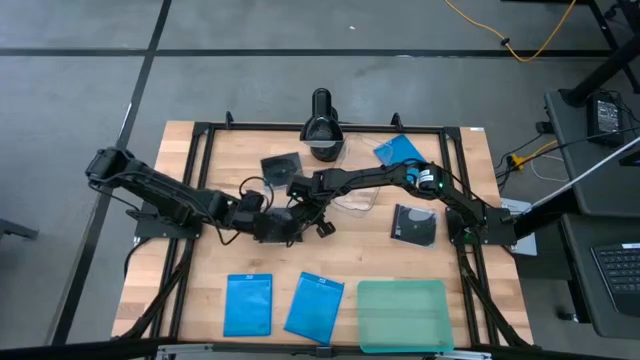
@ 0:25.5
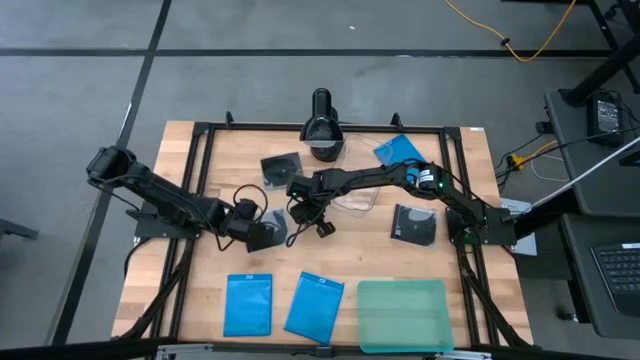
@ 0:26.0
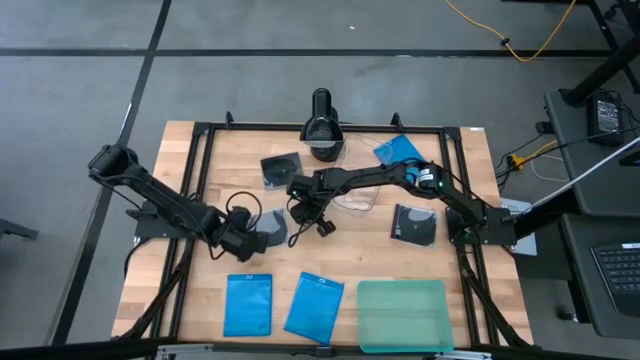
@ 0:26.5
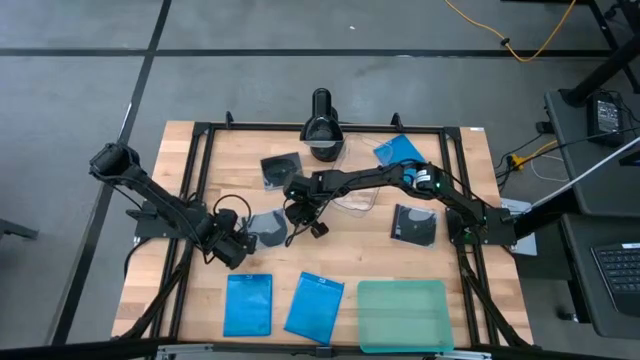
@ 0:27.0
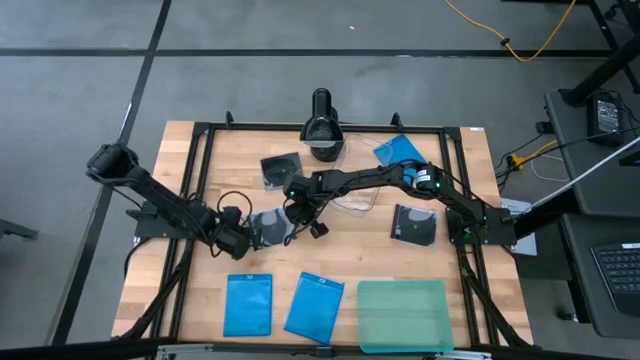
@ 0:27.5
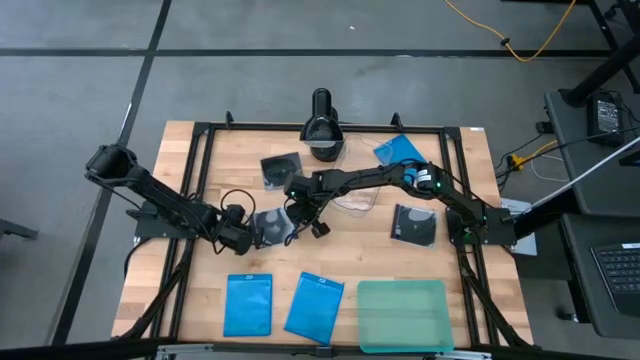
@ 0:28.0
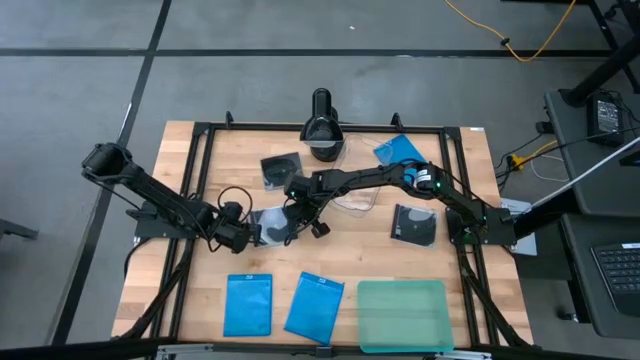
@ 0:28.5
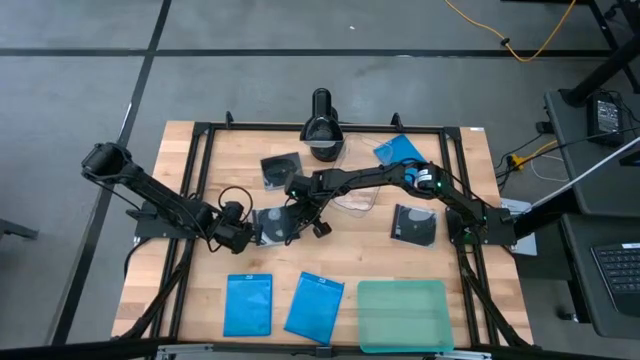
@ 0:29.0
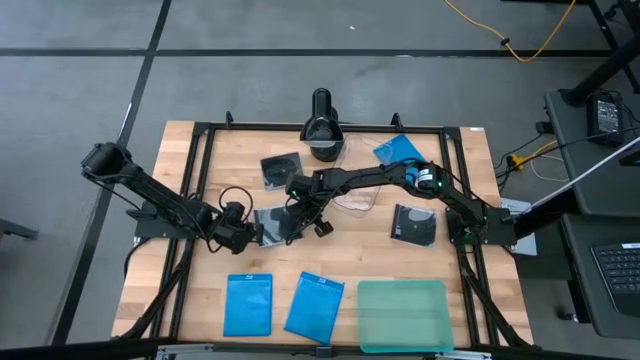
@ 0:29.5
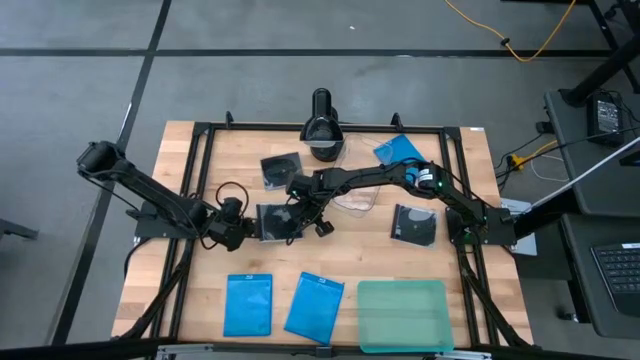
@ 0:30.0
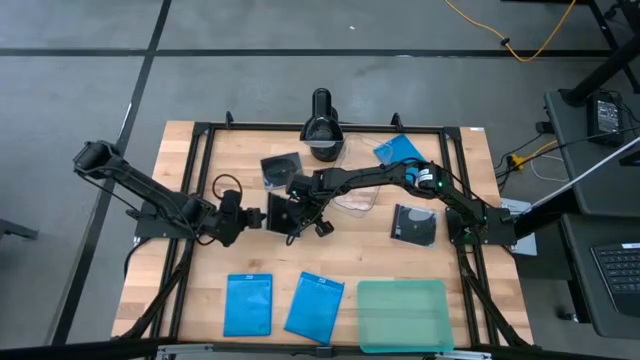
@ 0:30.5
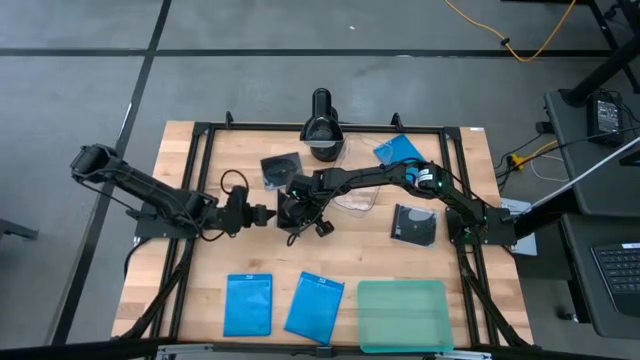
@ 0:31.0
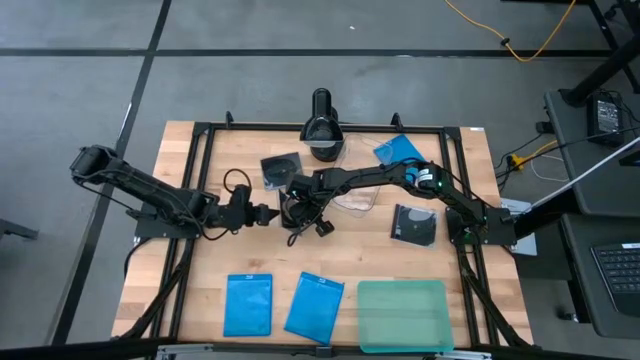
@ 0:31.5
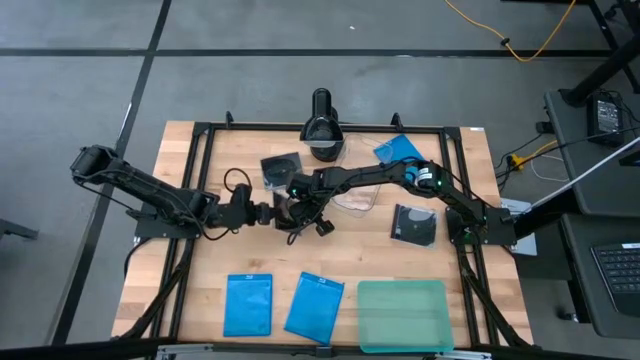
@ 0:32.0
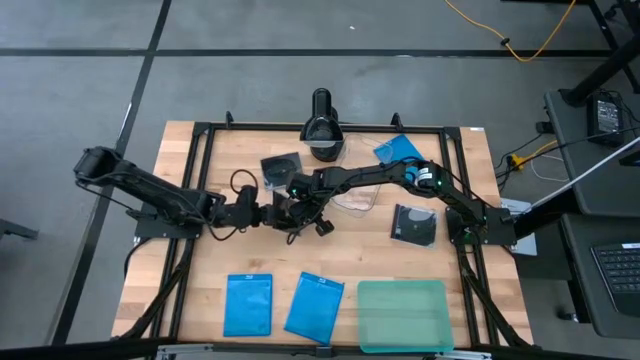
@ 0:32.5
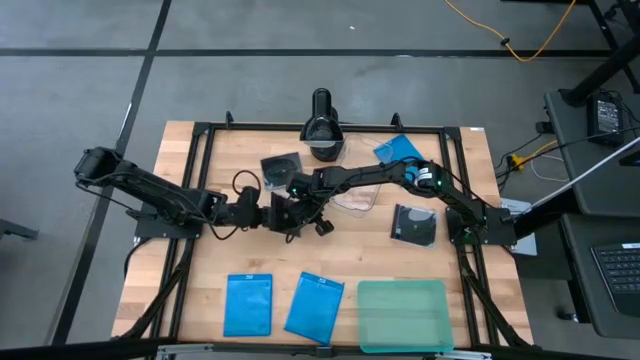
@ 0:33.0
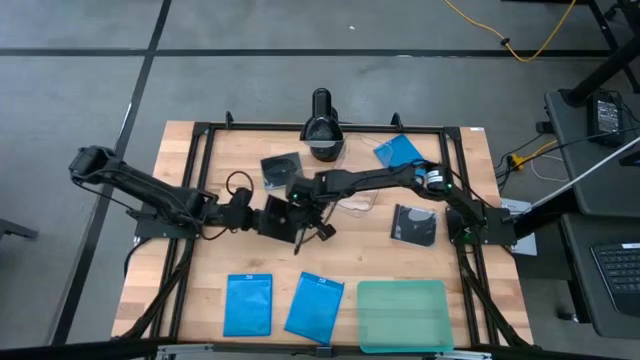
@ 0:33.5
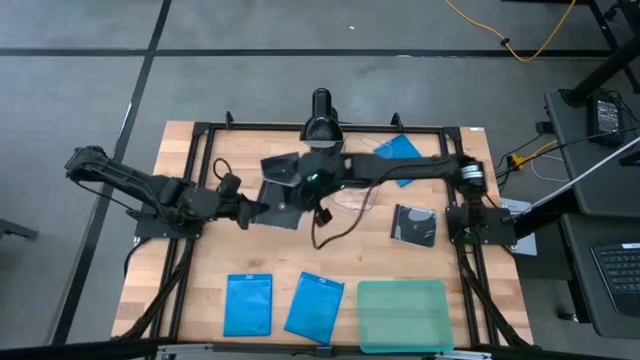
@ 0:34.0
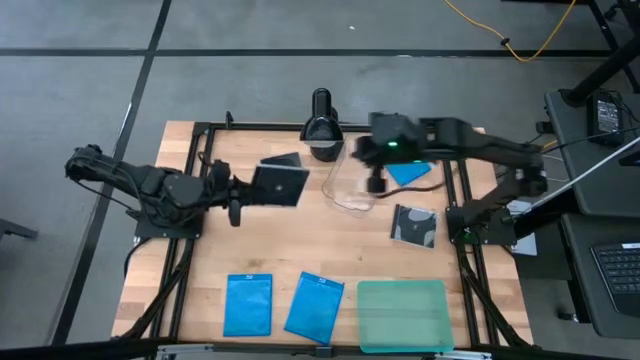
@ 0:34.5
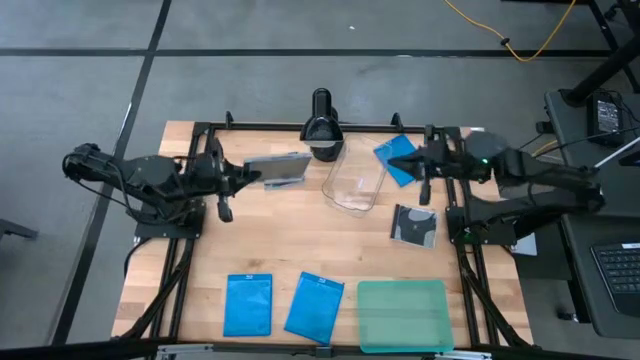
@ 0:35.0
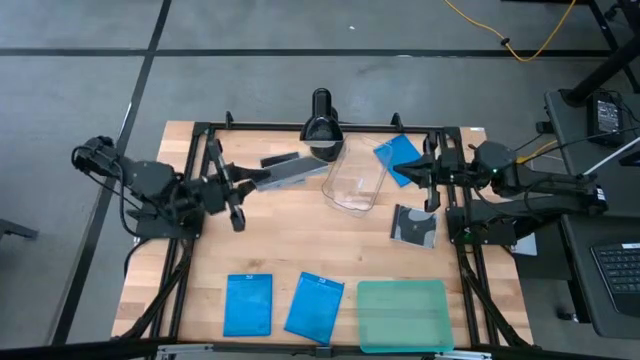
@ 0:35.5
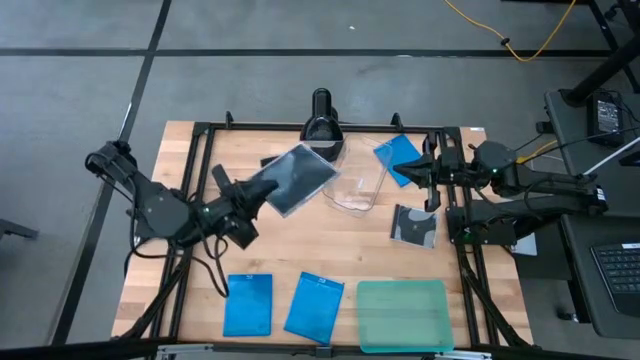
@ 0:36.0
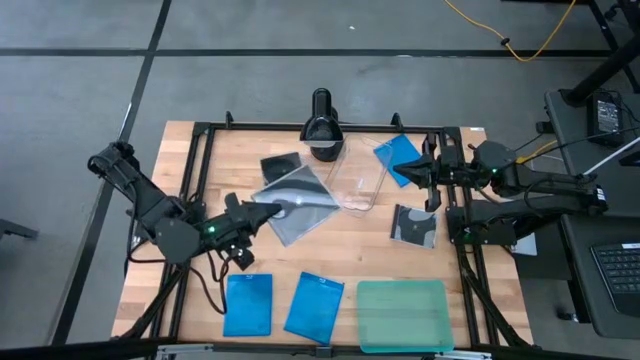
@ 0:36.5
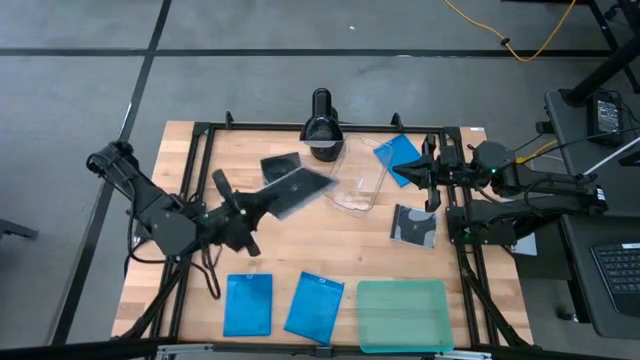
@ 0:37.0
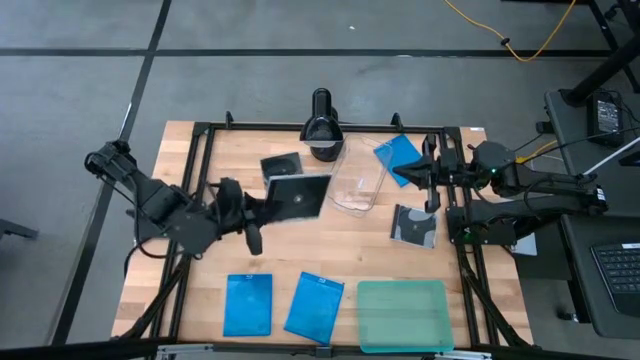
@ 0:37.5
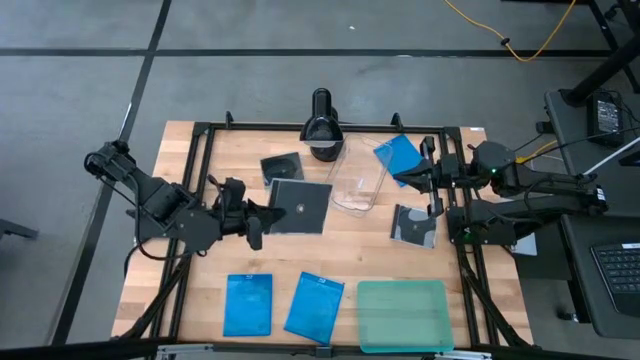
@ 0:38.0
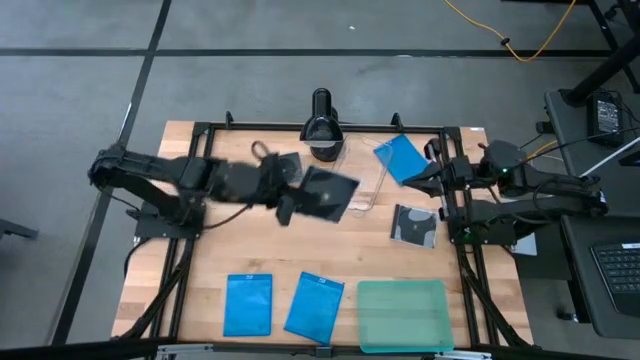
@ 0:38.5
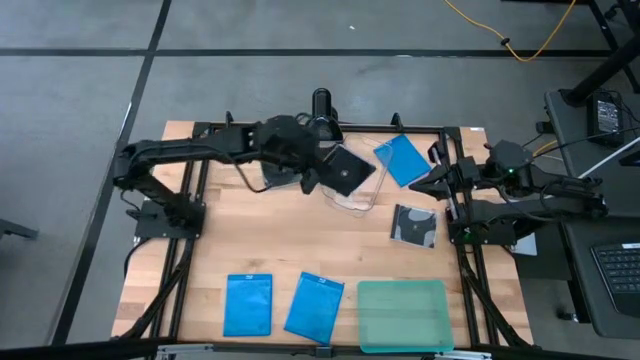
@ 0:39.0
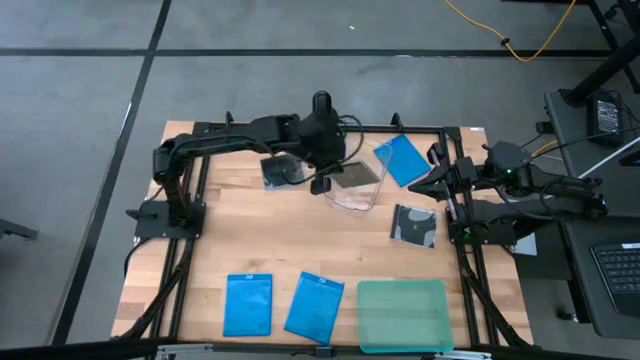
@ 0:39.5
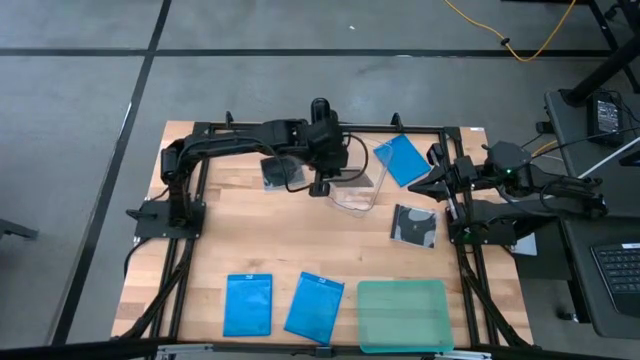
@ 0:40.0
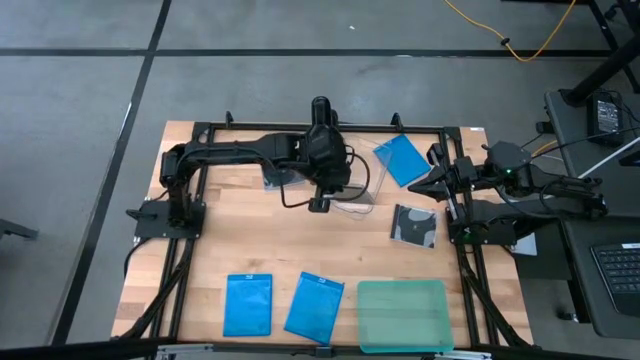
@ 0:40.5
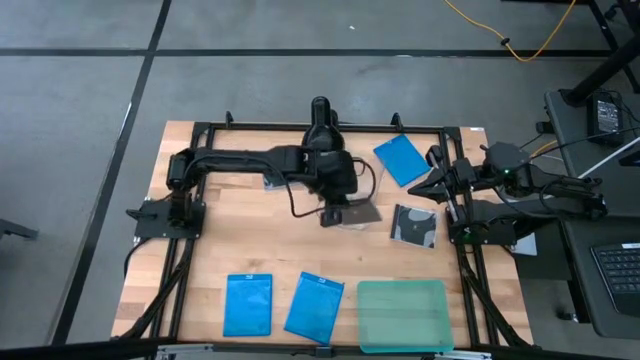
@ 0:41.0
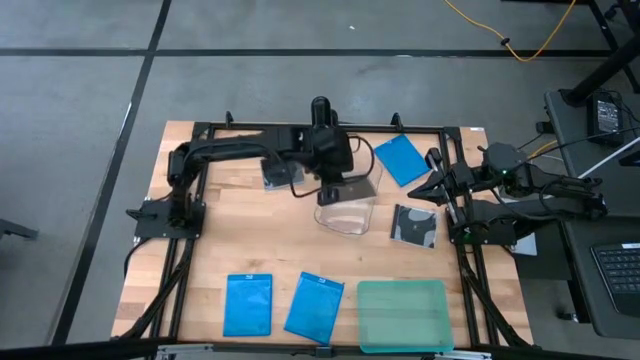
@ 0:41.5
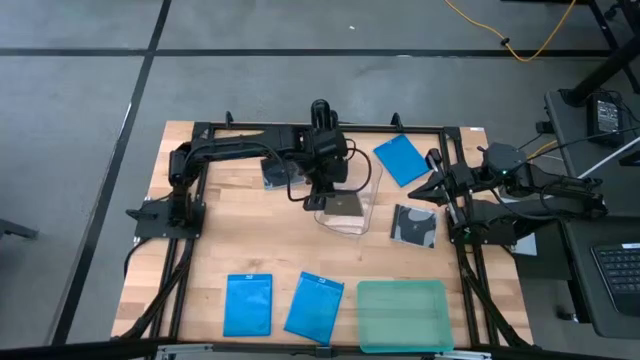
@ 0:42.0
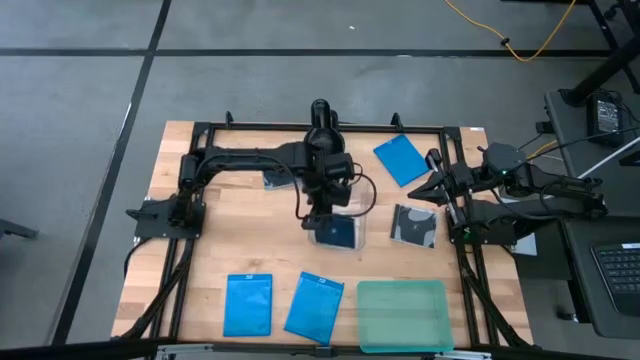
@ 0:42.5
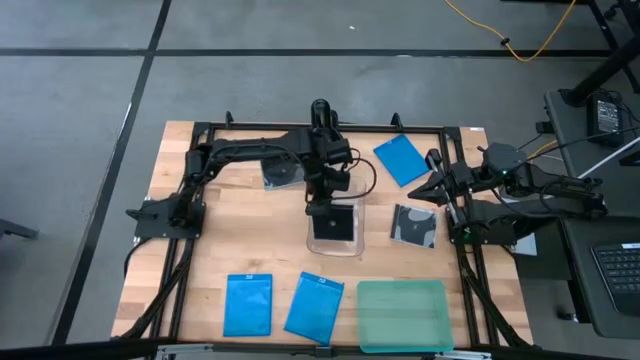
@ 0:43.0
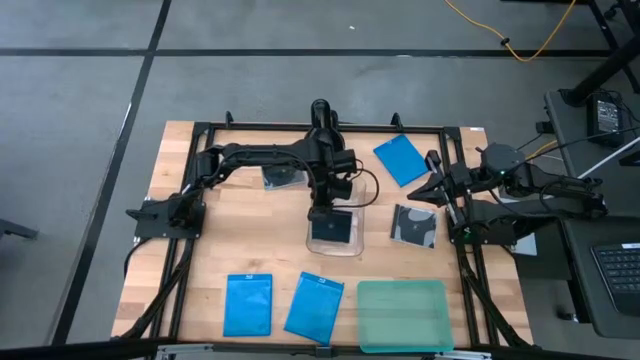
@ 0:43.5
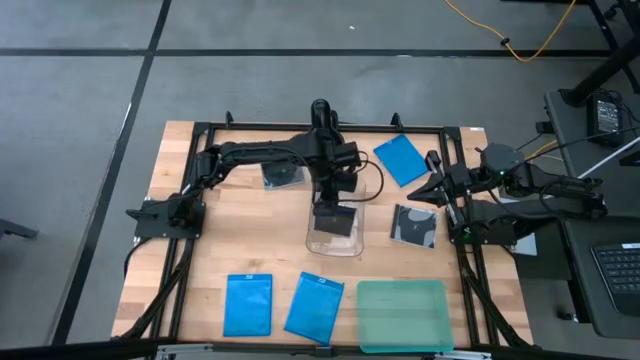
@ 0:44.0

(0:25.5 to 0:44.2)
Task: Pick & place jewel cases by type
Put the bottom left black CD case into the transparent bin

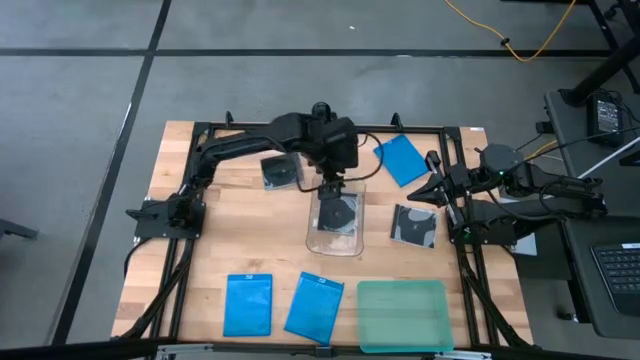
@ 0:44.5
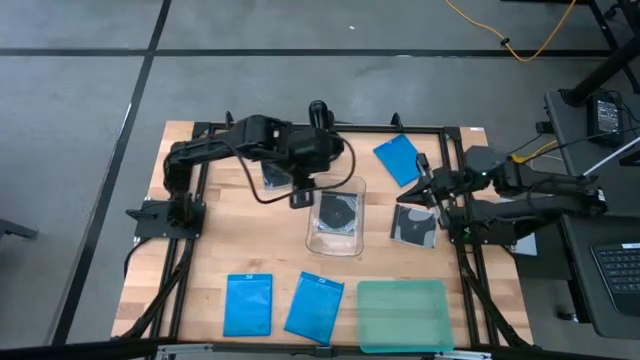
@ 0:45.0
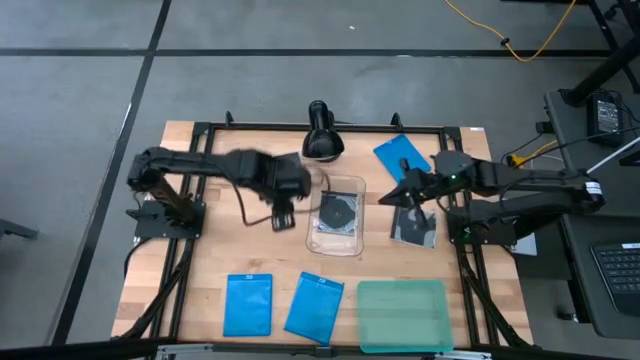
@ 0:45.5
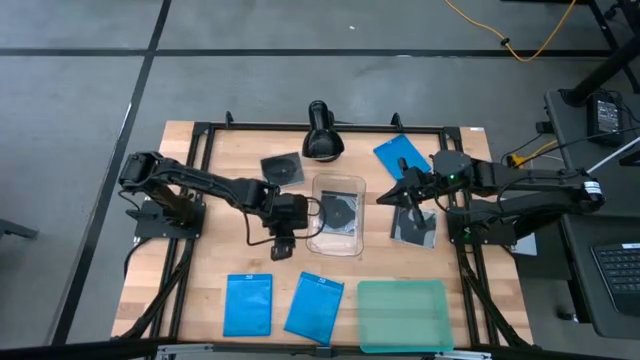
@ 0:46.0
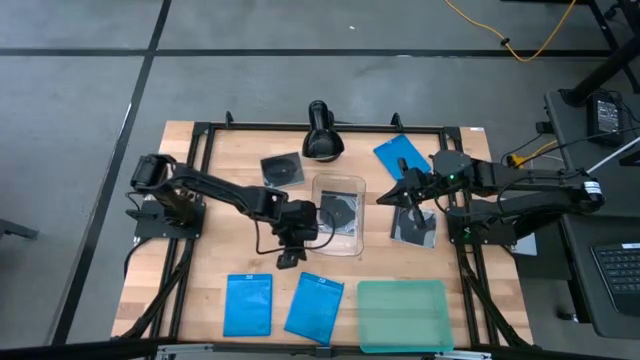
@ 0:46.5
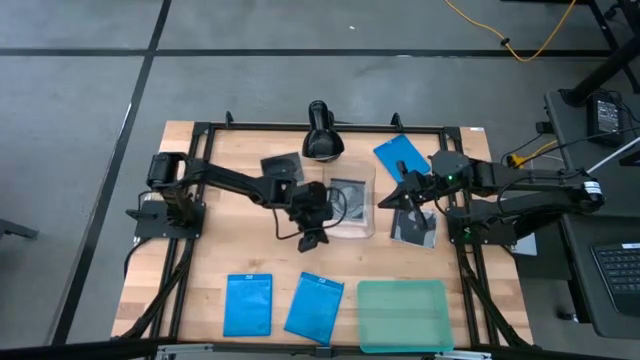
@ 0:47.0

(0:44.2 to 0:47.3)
Adjust the transparent bin
